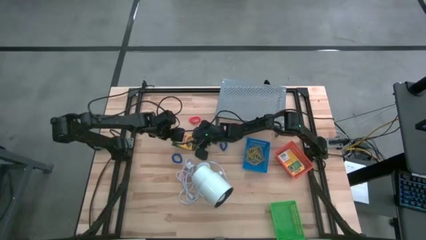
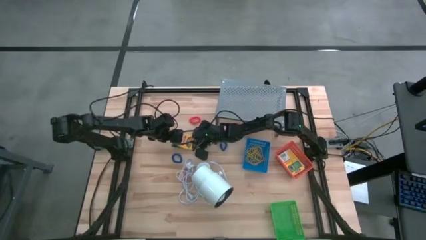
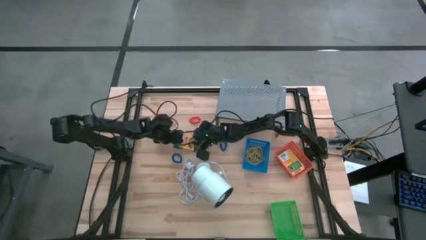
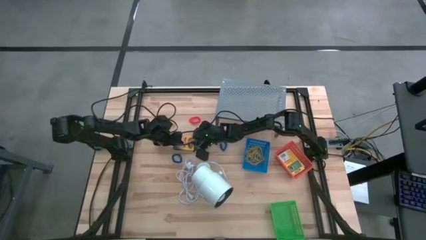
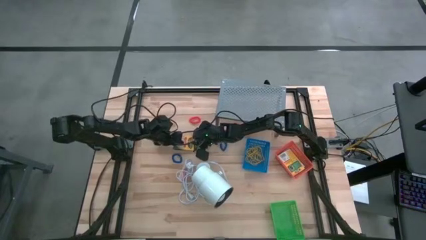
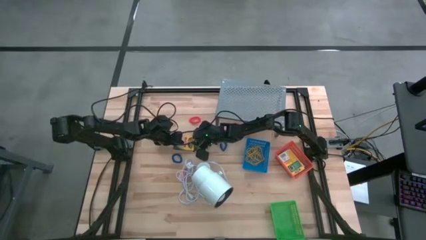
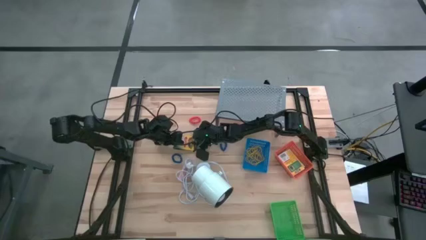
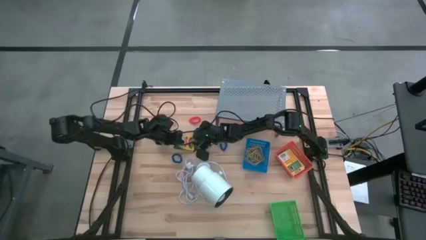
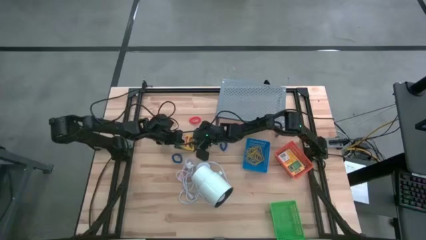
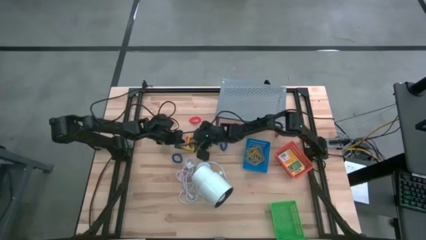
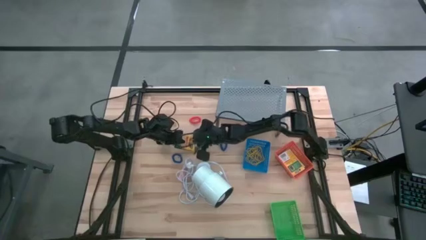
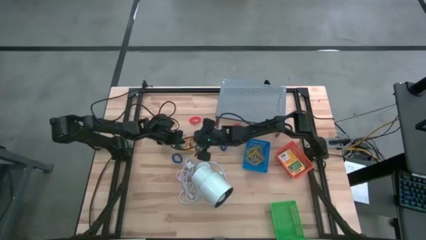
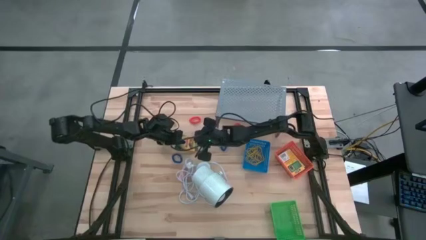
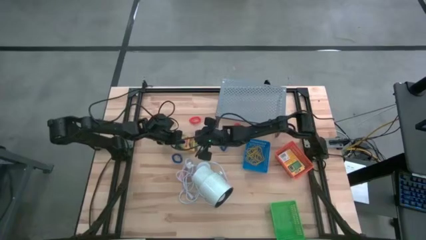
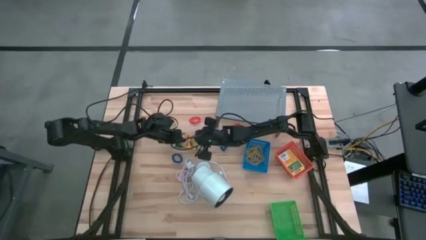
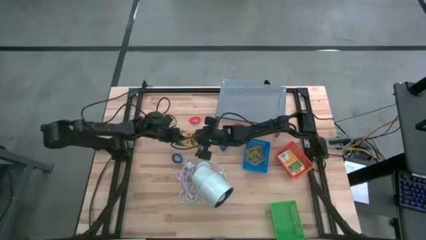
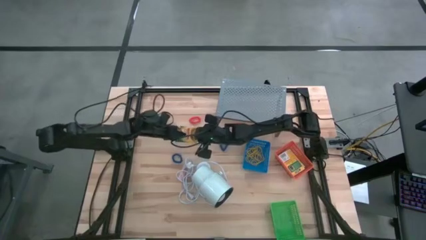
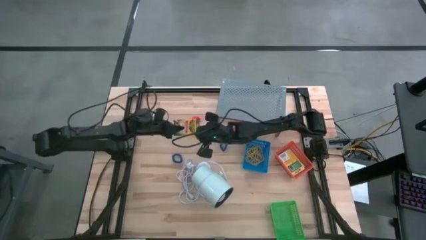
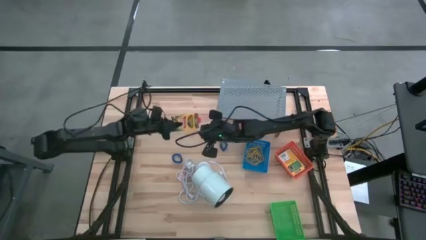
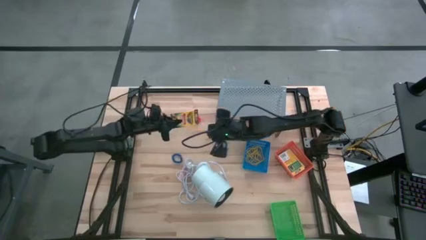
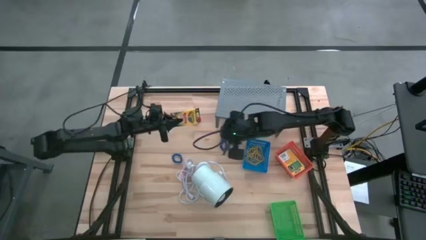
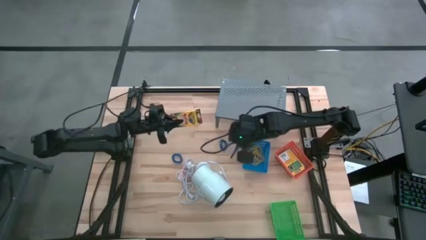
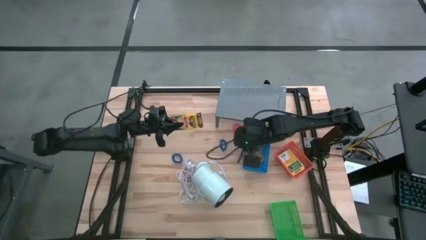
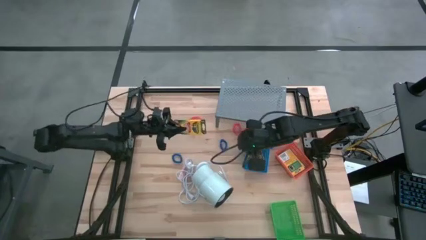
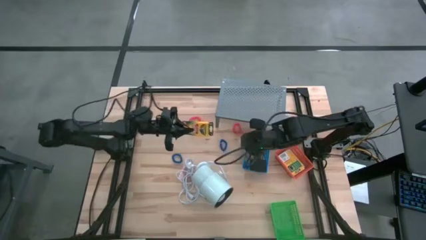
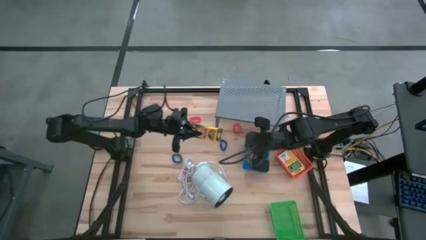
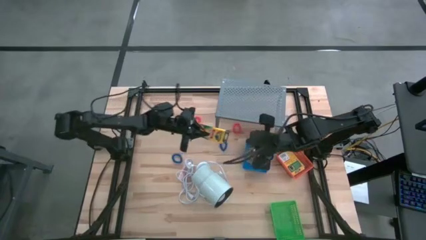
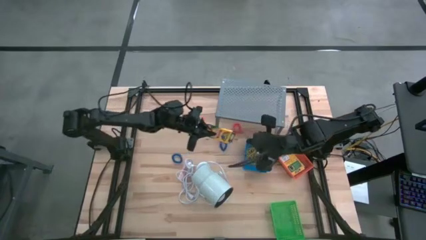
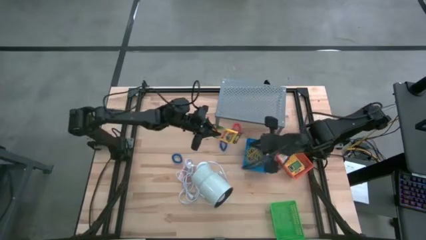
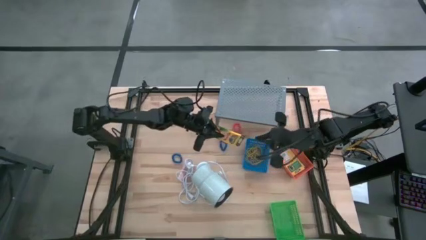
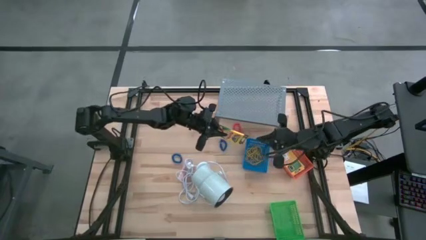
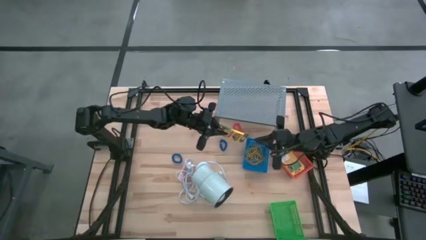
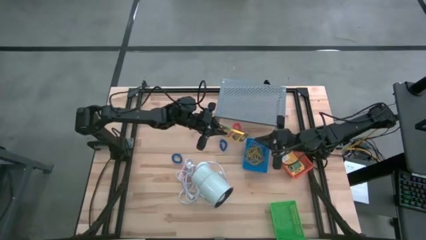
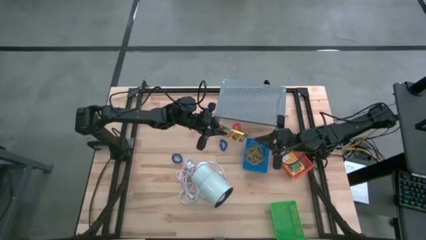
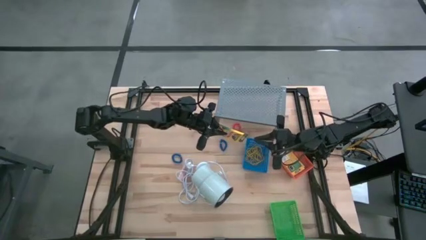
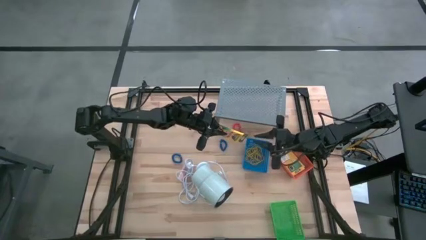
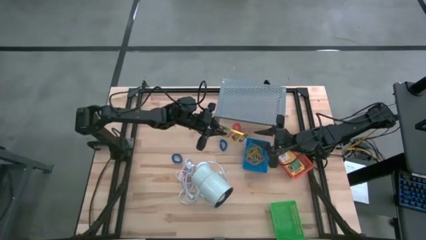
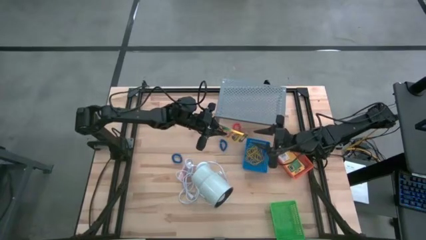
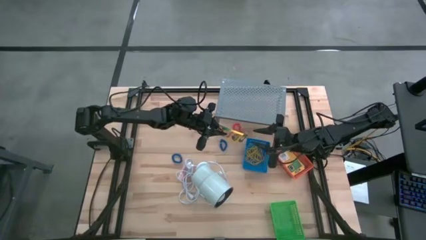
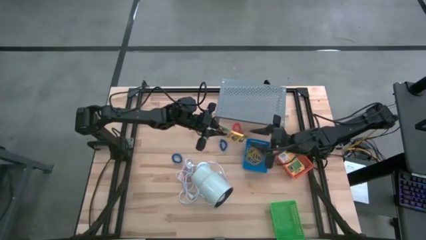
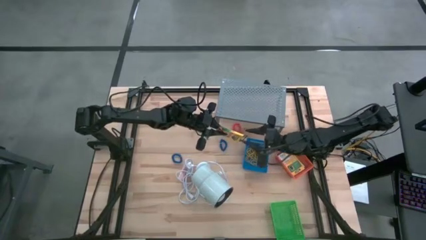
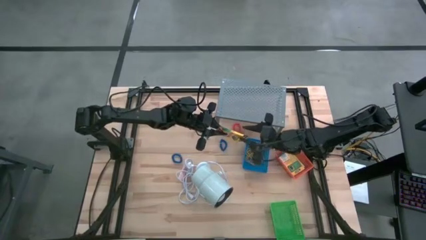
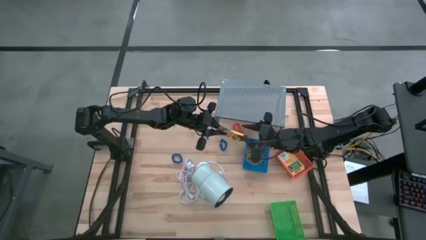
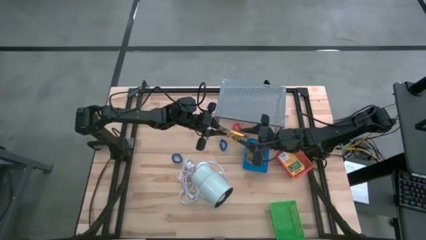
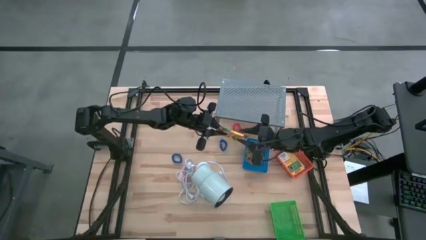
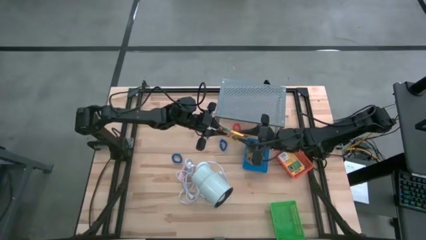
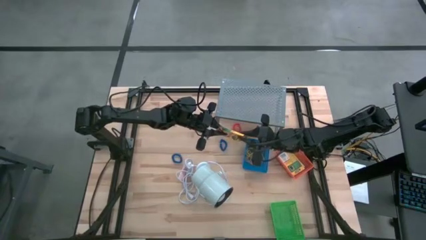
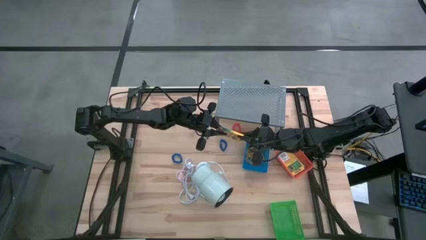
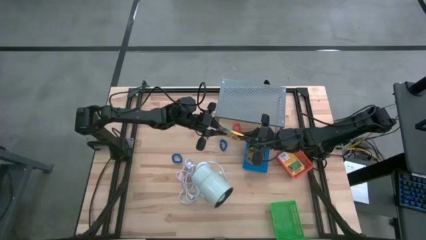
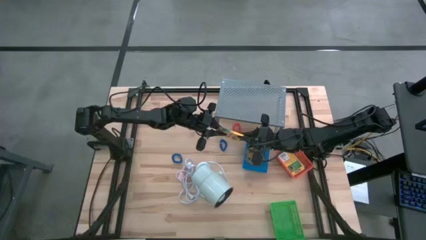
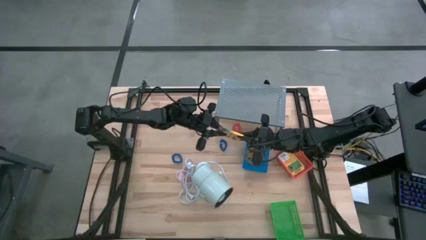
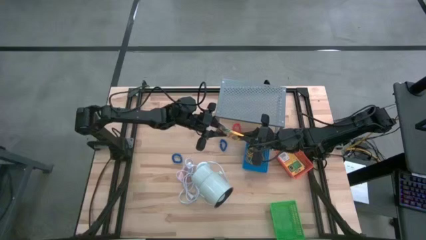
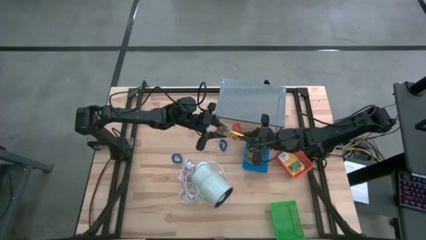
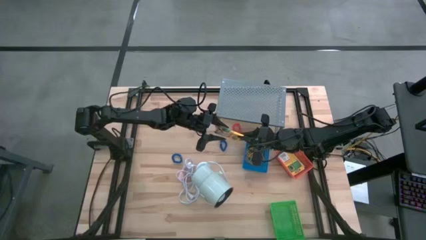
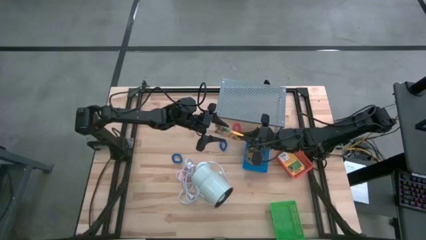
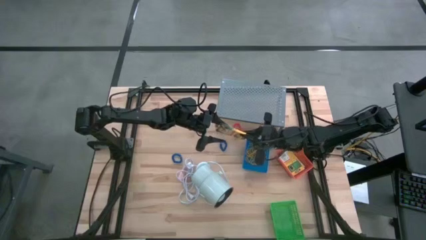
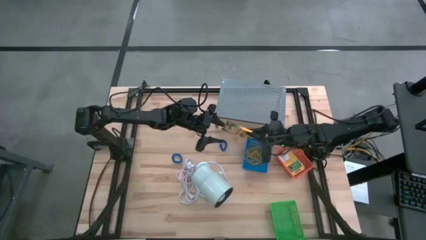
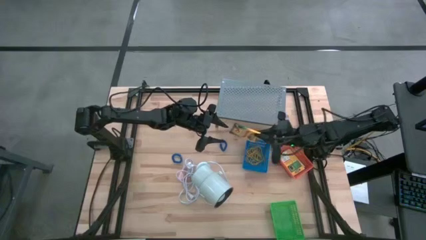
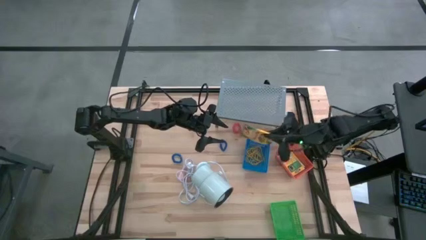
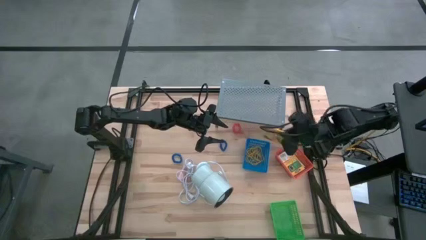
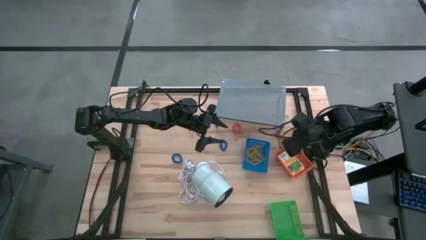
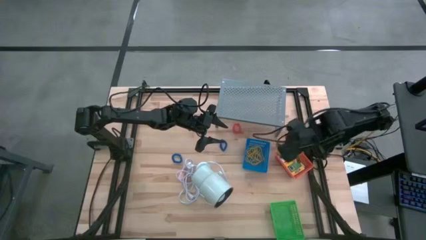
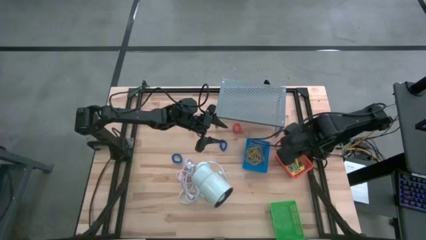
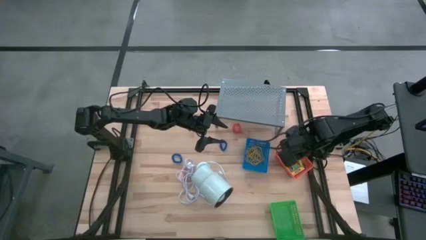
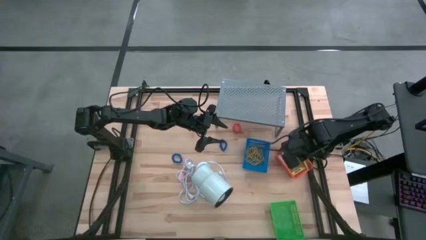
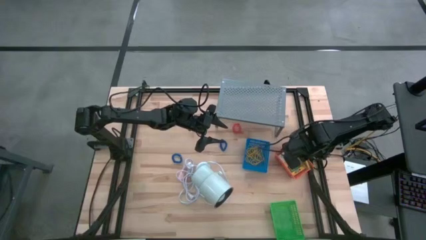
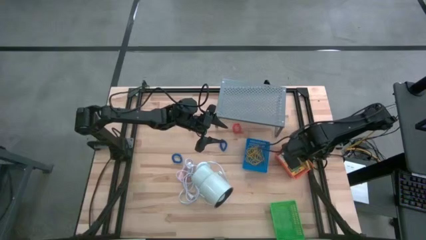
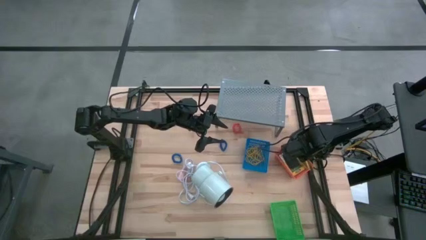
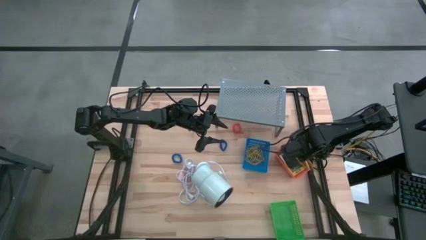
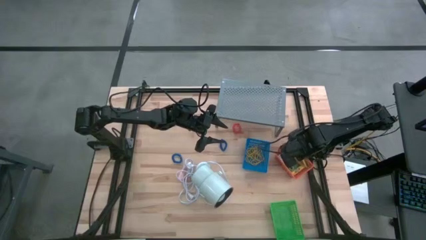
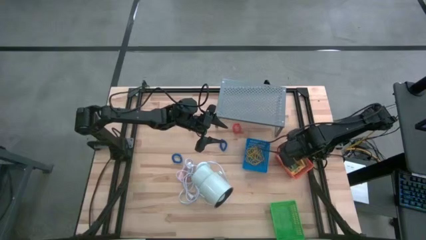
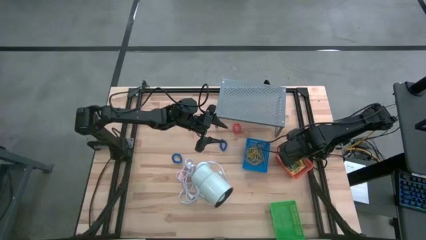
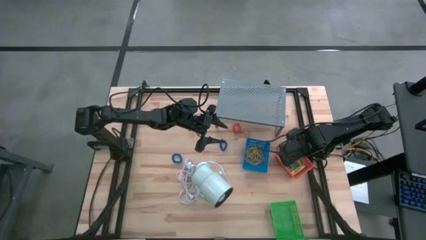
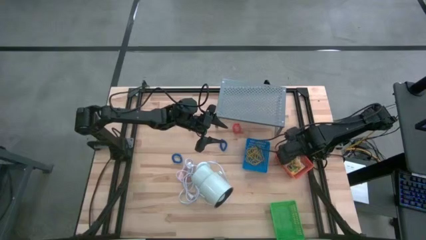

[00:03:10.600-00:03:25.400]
Task: Pick & Place Office Desk Supplies
Put the yellow box of crayons into the orange bin
